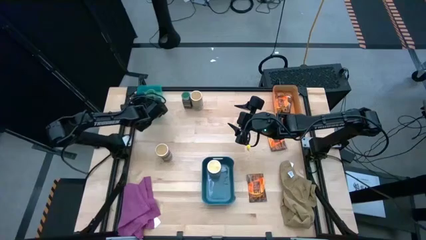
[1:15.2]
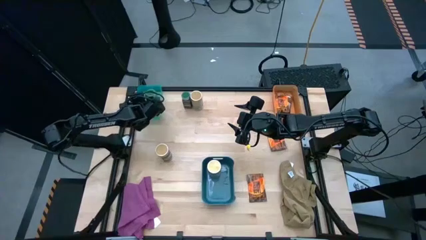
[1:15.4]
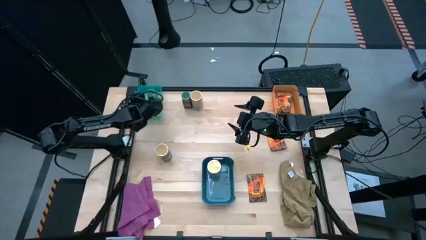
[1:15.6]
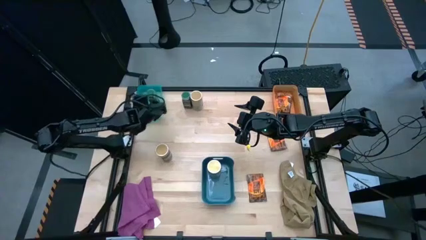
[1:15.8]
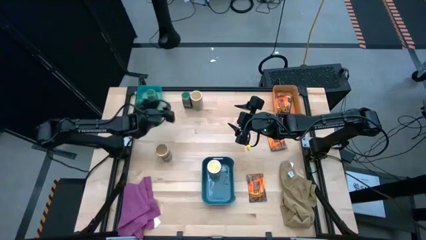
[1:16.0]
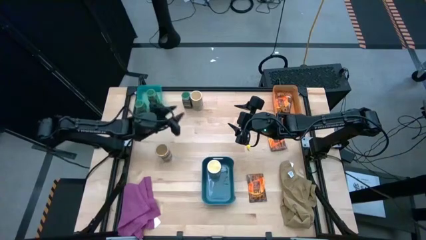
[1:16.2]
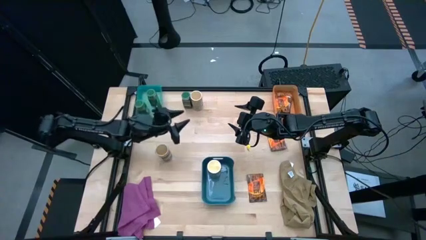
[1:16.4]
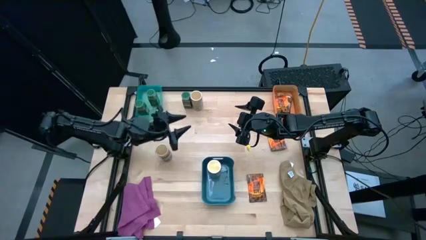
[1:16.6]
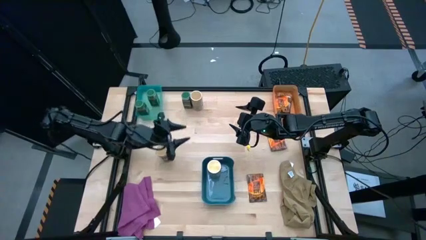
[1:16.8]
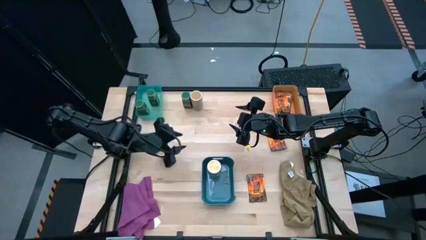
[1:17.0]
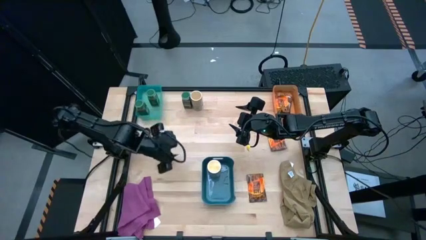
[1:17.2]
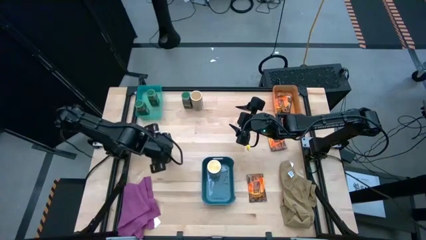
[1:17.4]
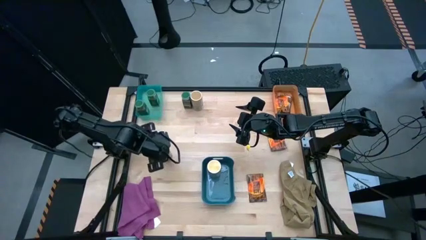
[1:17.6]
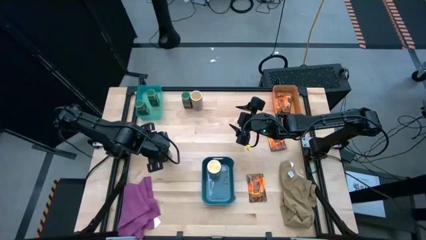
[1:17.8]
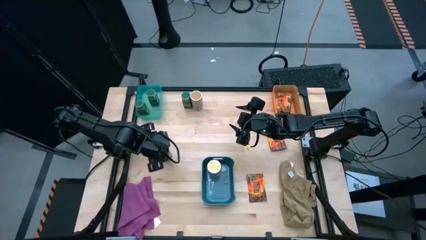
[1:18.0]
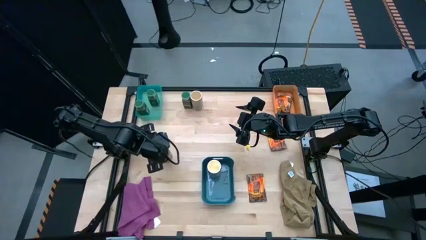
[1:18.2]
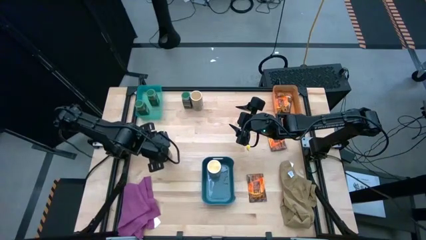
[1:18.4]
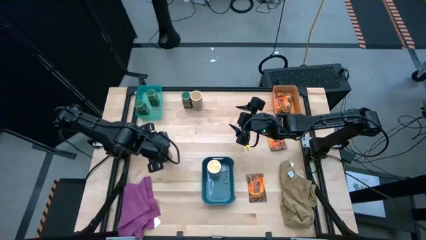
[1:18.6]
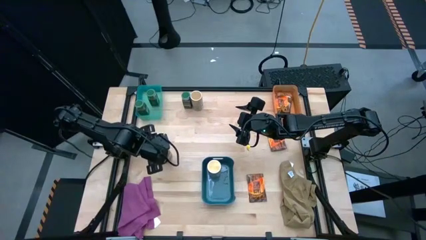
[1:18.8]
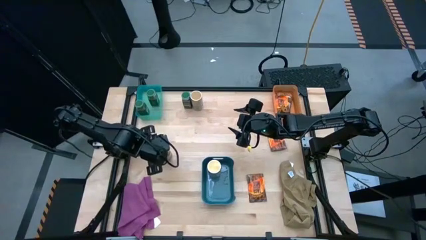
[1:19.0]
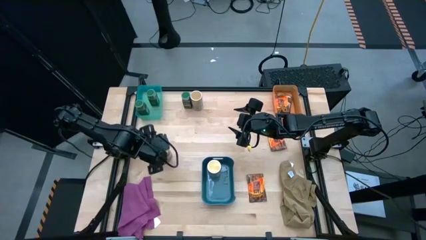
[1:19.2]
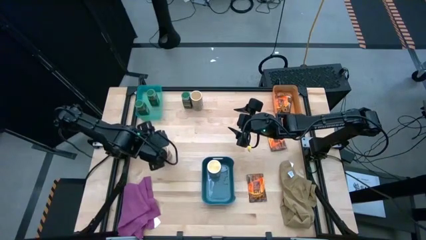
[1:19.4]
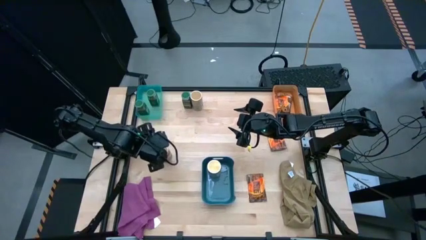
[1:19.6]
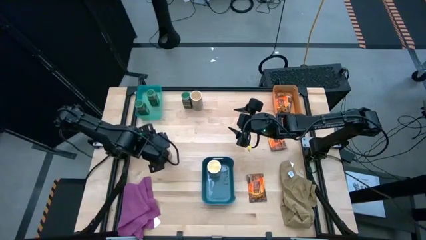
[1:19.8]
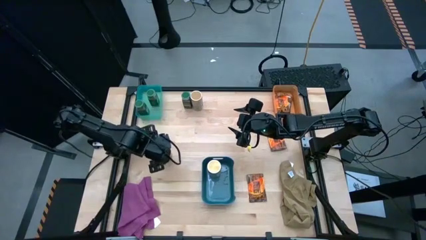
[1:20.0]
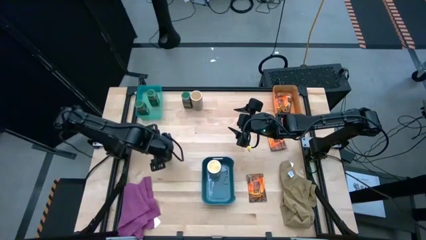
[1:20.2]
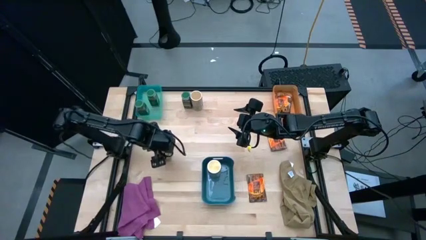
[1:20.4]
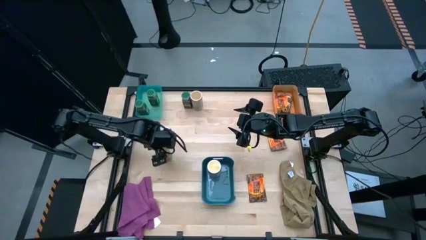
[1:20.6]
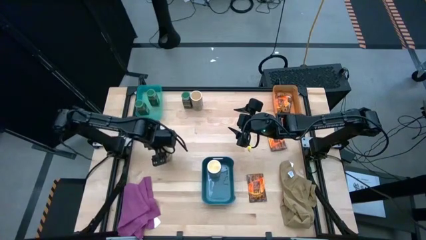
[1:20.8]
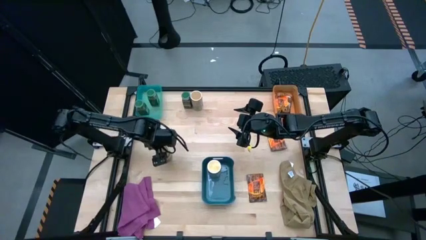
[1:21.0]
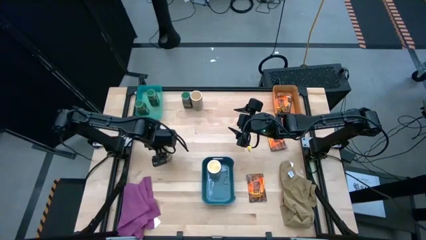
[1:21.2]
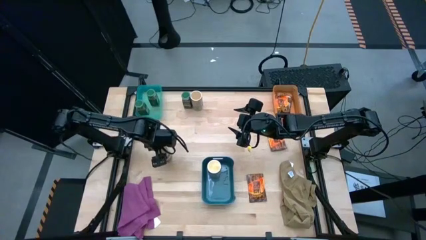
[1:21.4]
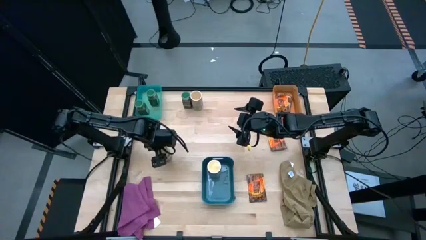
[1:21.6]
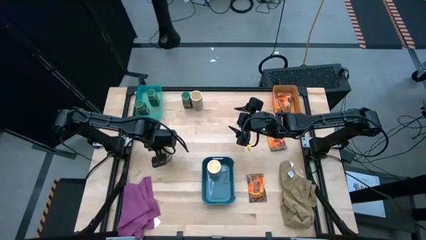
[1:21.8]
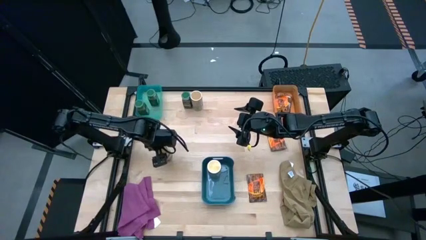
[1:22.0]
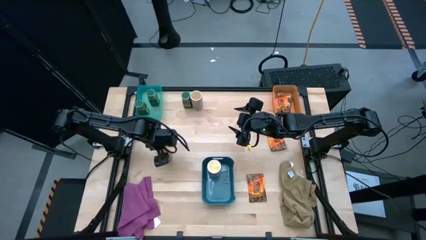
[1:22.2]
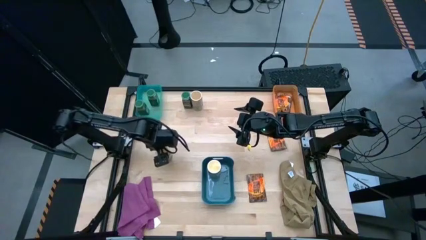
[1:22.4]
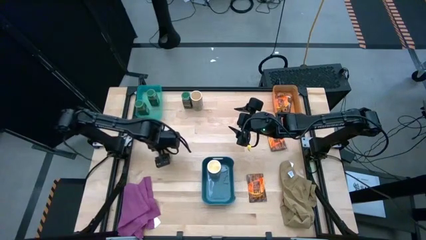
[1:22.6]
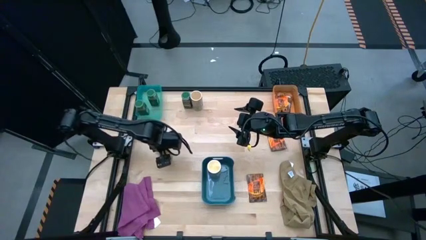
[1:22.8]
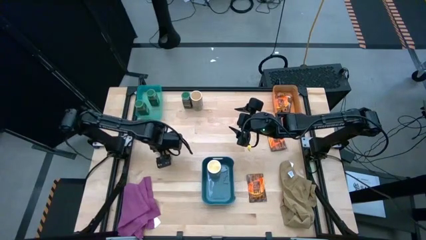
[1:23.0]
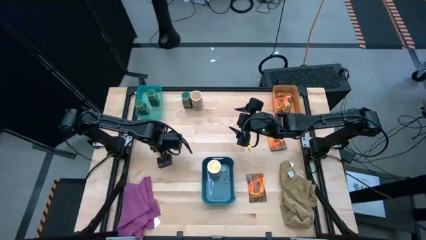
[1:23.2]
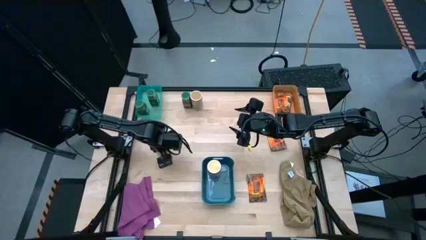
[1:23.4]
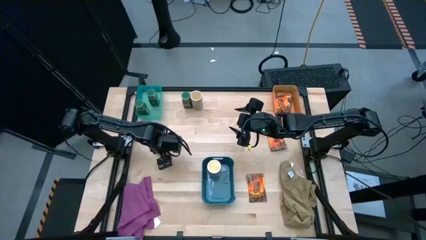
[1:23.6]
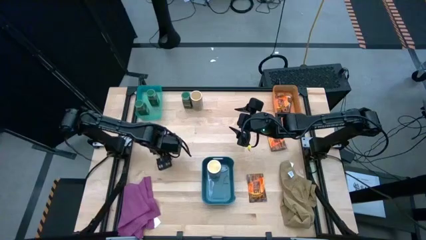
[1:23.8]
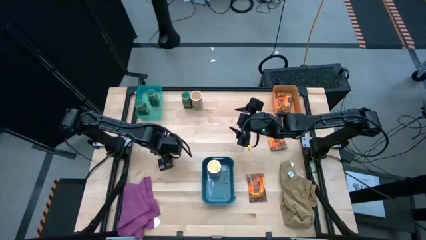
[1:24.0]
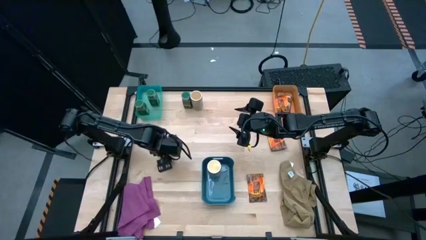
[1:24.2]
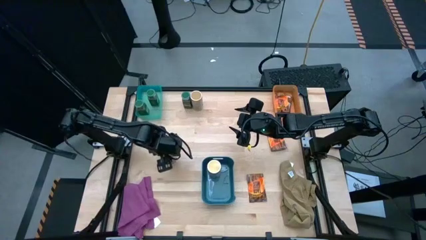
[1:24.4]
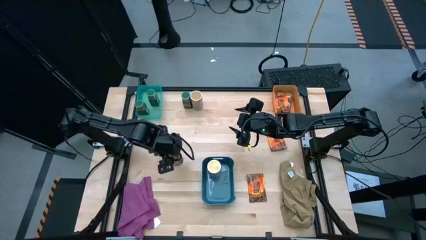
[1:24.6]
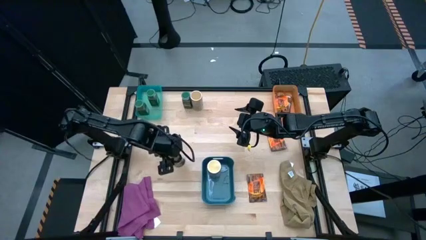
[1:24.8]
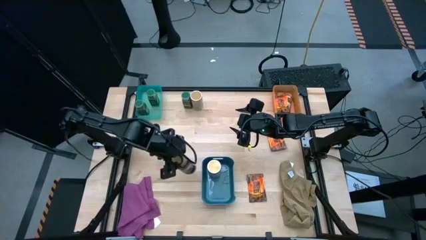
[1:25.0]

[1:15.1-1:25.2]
Task: Sort spices by type
Put the gold seasoning bottle into the blue bin
